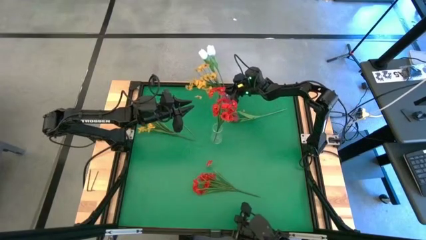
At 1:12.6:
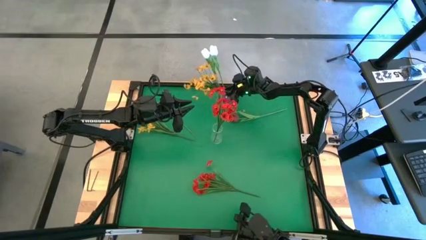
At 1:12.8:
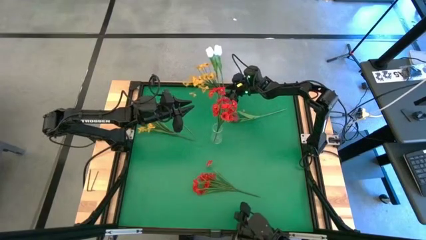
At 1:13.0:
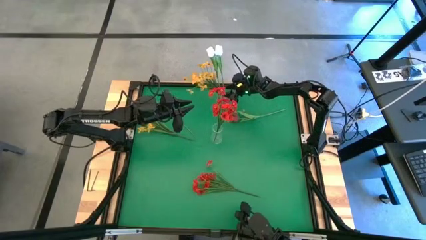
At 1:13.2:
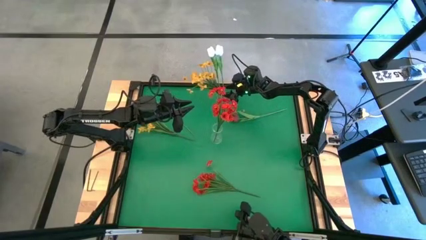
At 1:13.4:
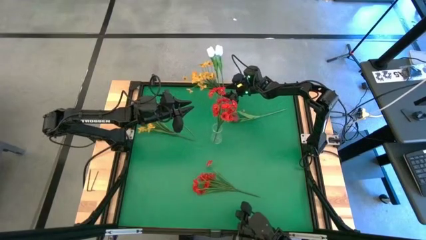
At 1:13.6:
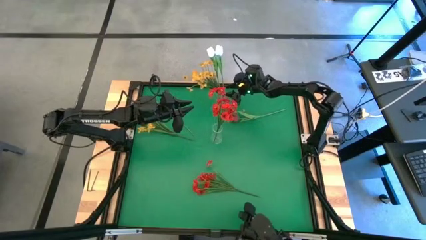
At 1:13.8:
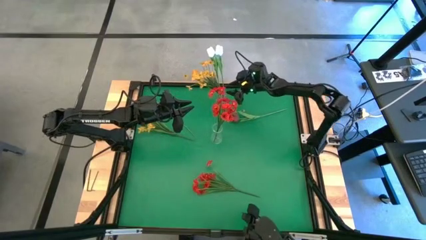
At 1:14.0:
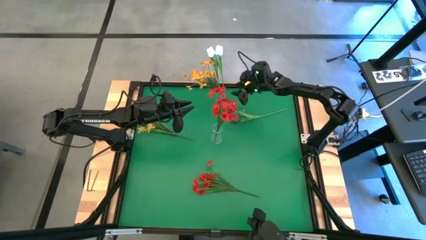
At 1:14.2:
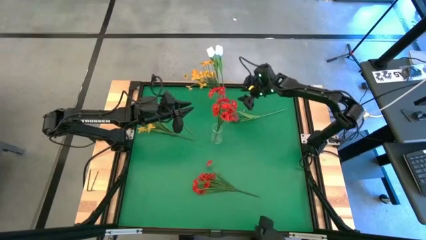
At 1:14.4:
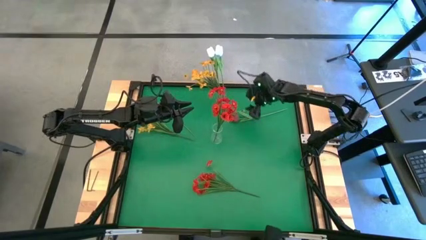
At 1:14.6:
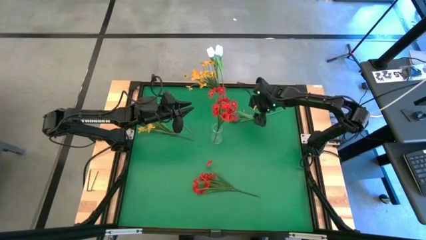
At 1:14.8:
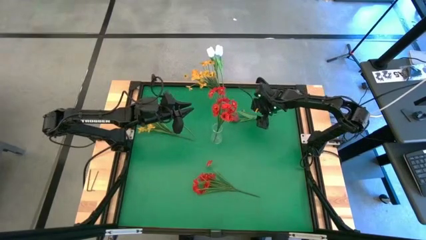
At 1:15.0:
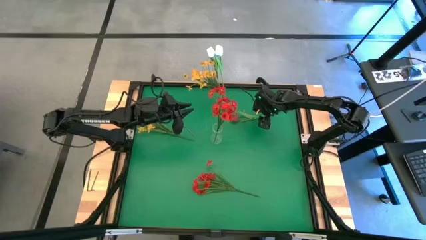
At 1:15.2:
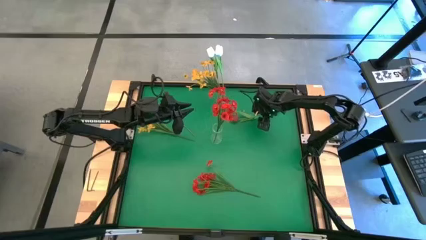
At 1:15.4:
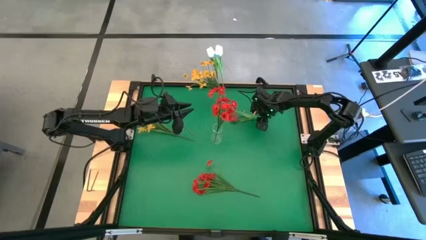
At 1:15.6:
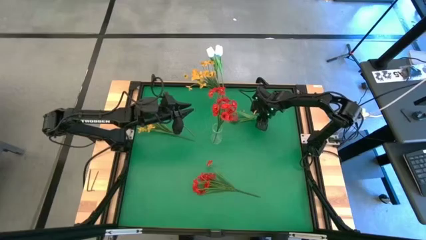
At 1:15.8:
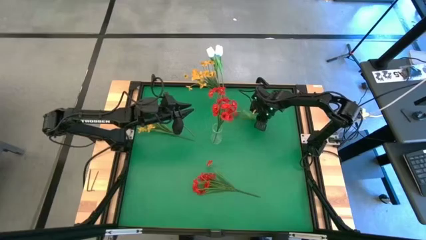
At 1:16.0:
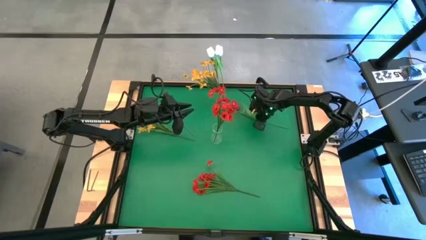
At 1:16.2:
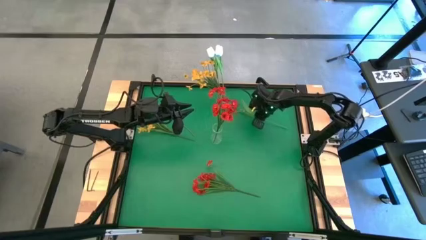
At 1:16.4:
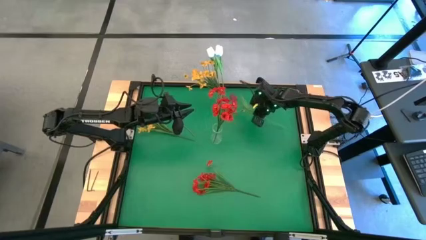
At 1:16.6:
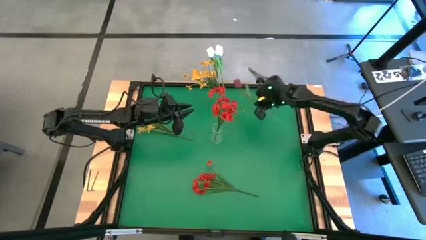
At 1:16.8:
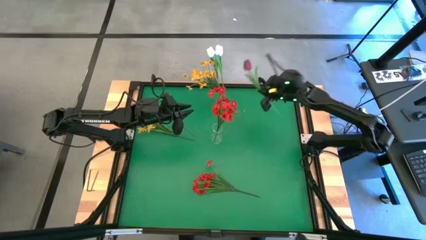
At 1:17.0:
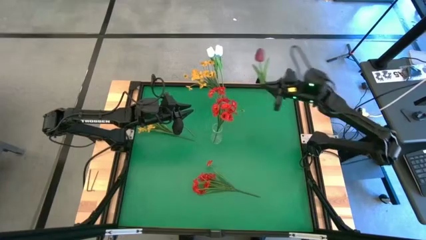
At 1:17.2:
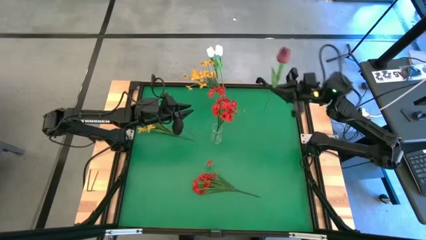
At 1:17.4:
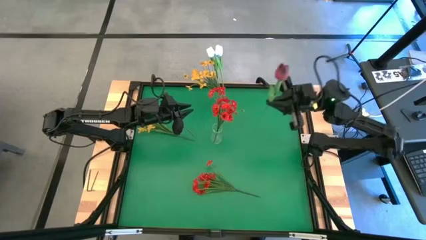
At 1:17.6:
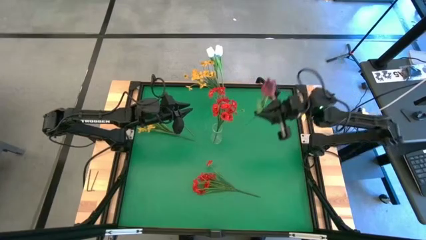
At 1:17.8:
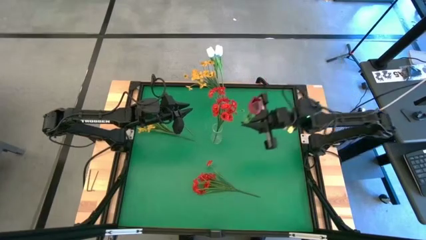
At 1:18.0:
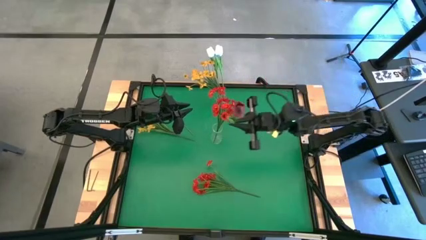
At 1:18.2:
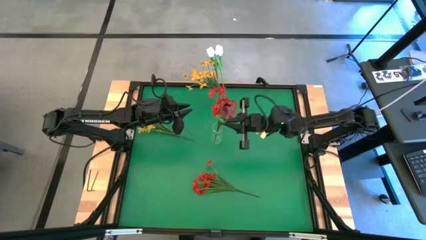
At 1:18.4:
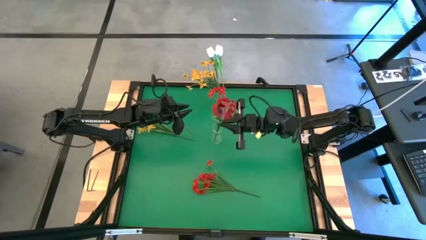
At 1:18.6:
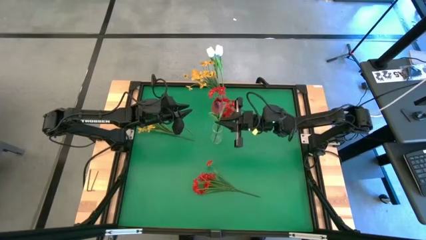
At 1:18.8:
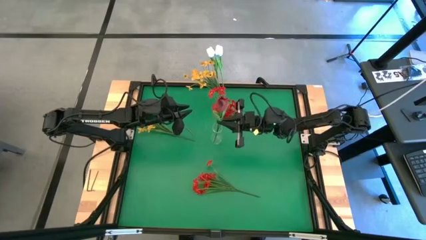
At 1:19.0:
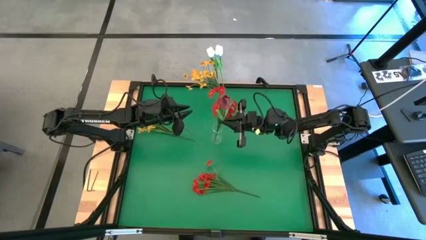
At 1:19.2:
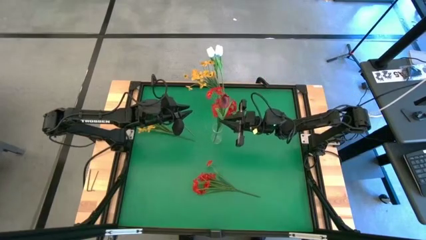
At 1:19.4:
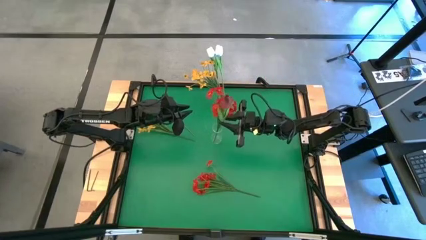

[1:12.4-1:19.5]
Task: Sort flowers into vase by color
Put the right red tulip into the transparent vase

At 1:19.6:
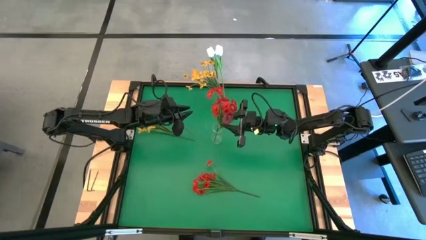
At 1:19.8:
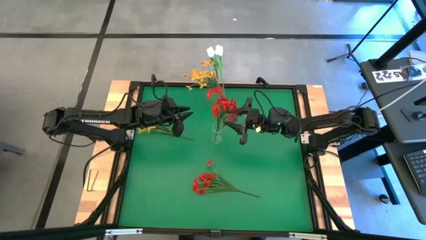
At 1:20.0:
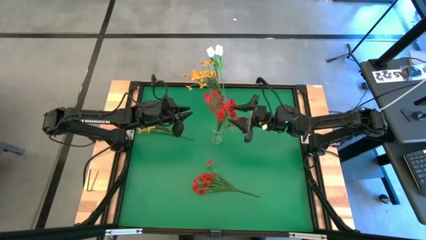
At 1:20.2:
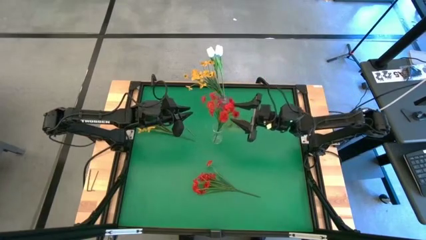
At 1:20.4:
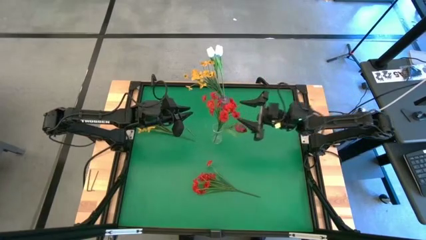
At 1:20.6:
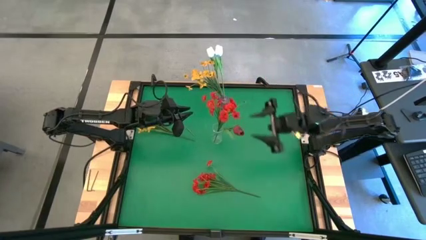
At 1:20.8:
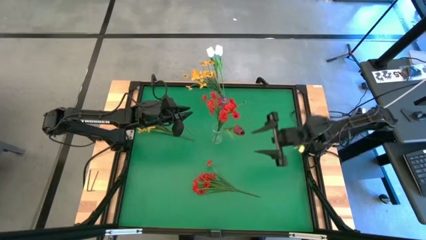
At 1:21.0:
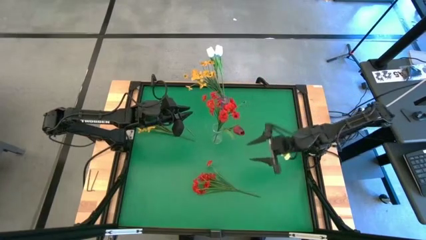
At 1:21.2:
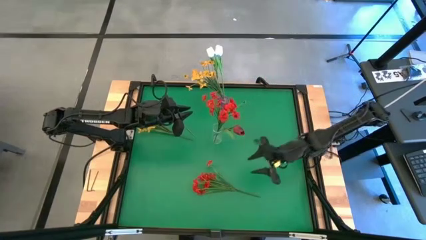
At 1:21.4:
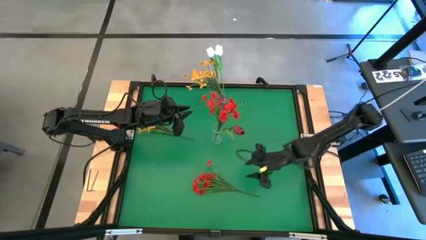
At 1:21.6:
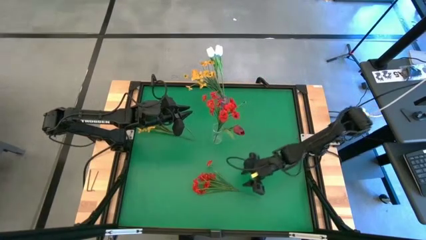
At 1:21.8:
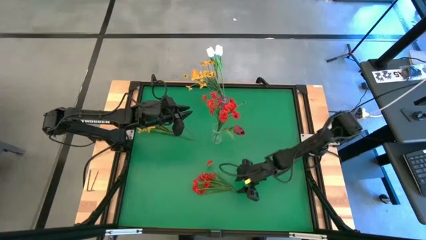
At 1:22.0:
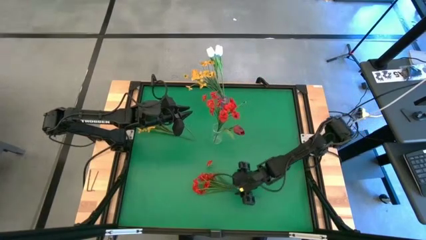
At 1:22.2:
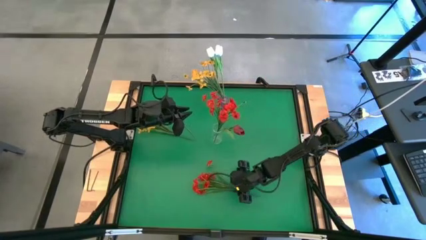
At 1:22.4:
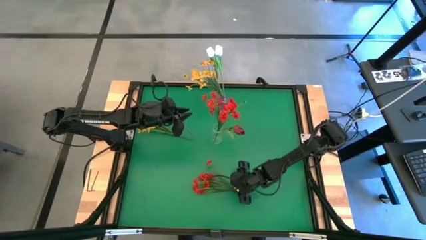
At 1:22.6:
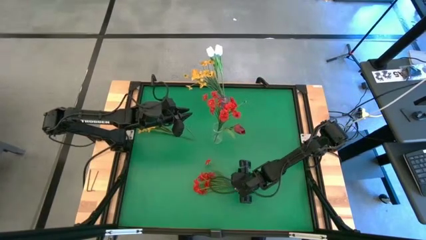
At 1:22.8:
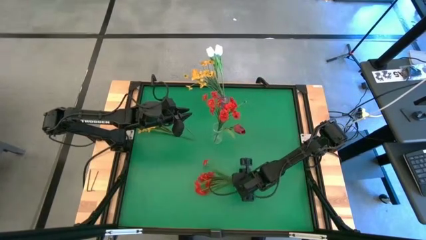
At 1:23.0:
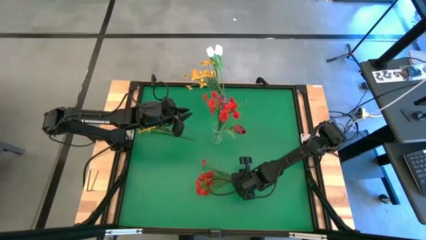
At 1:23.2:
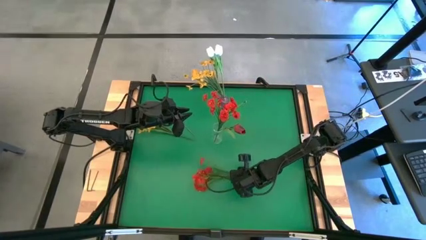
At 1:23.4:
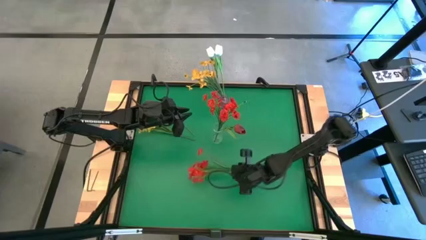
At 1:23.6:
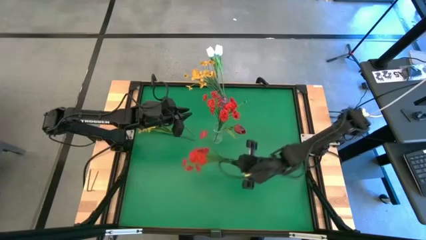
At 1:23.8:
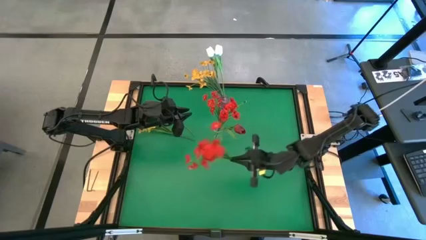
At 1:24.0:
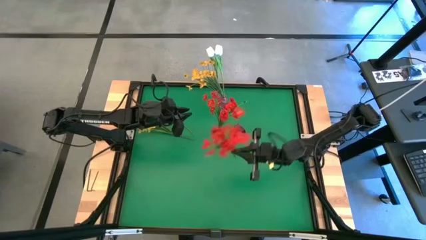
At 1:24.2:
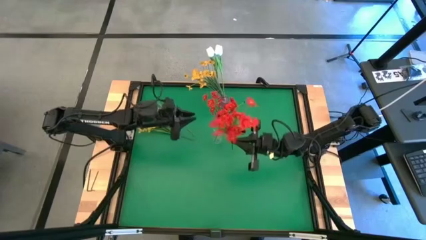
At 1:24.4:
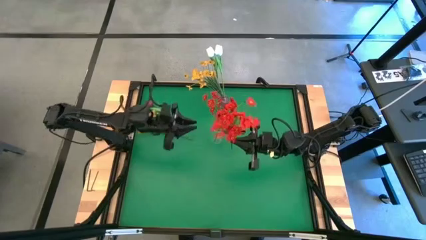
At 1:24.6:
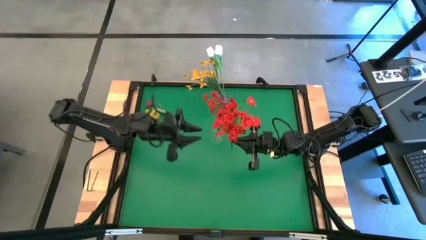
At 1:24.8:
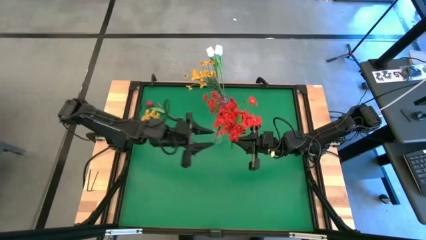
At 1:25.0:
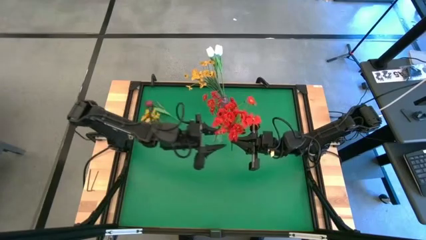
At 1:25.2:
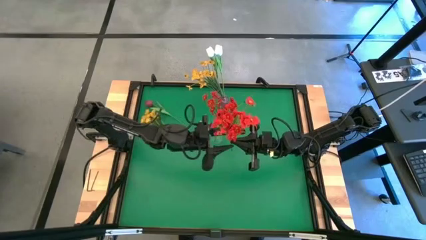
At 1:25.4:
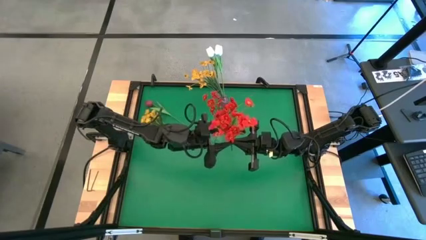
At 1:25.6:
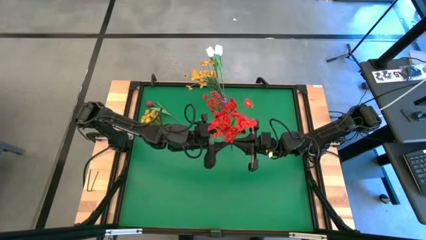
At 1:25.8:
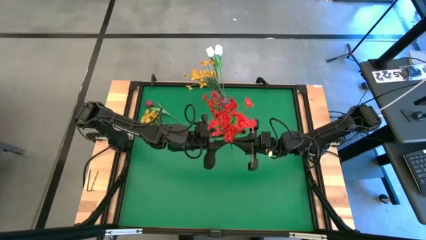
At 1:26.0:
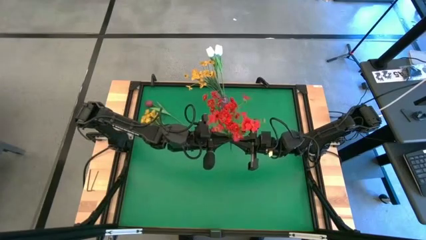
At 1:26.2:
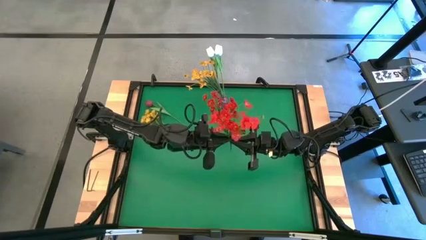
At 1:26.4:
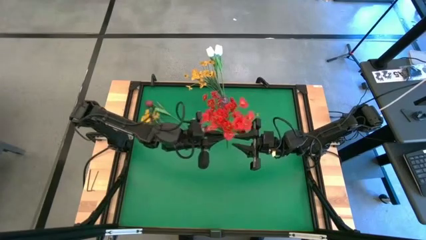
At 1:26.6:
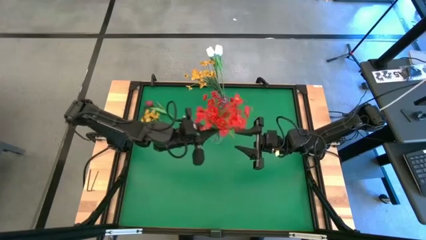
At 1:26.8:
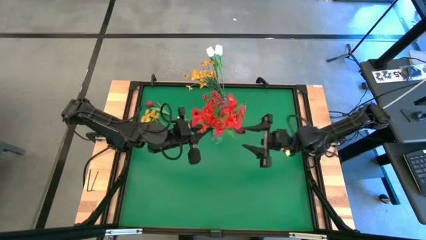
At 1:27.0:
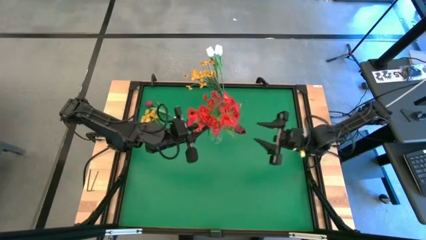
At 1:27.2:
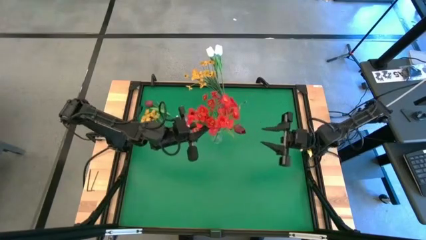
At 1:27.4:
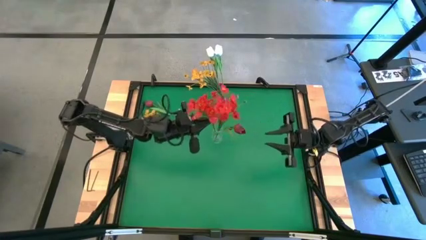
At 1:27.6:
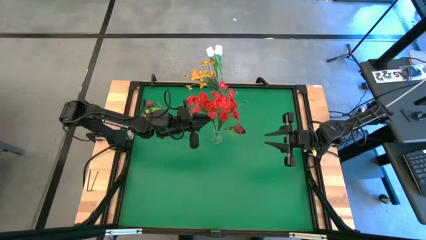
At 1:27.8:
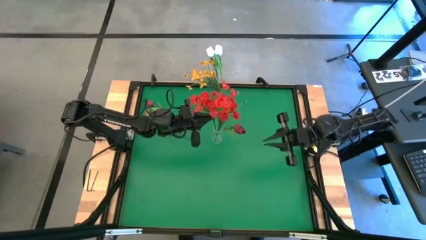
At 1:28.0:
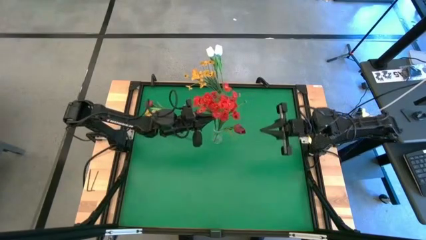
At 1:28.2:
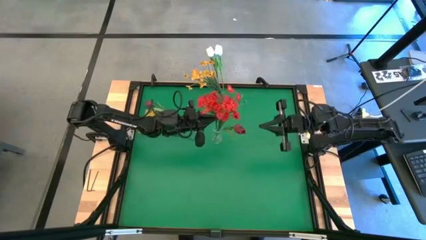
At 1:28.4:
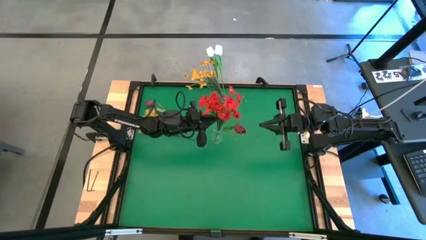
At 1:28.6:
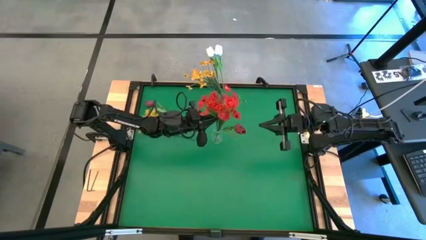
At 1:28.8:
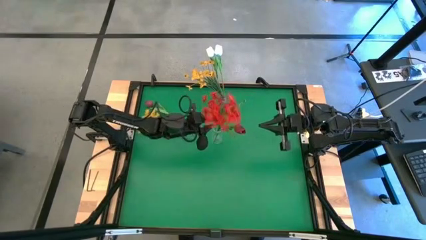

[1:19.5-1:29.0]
Put the orange flower into the transparent vase
